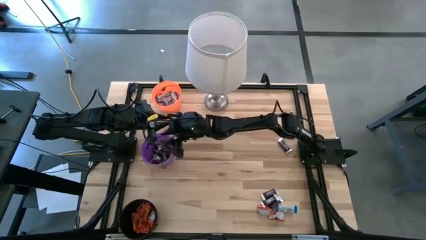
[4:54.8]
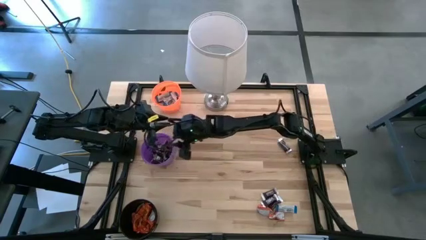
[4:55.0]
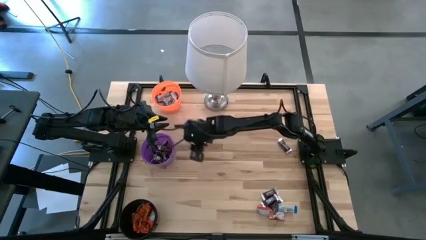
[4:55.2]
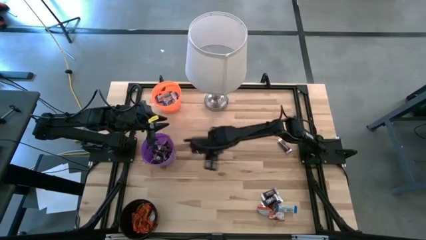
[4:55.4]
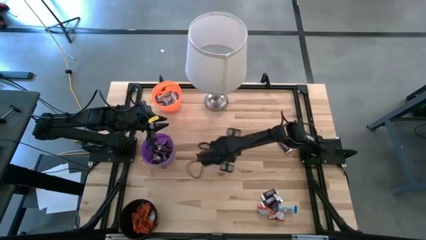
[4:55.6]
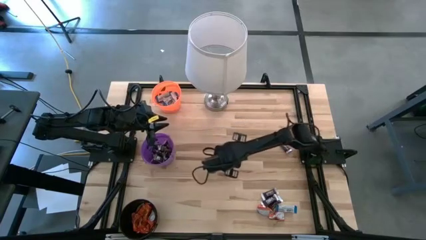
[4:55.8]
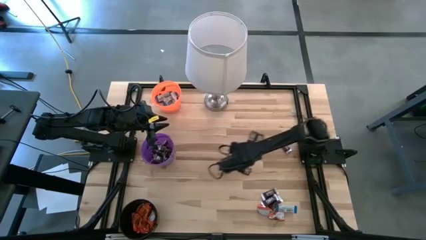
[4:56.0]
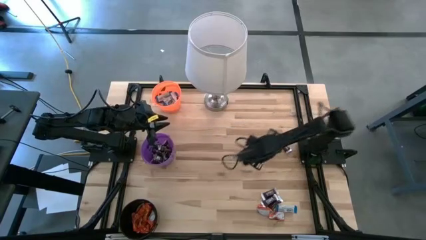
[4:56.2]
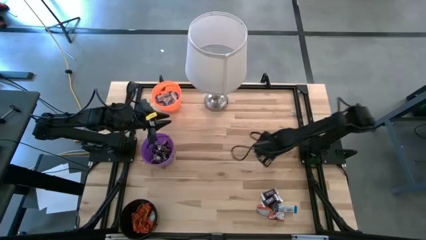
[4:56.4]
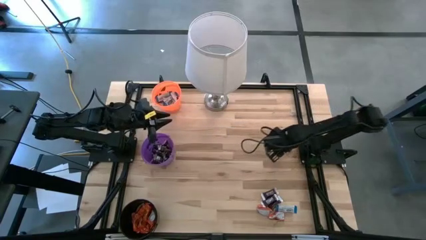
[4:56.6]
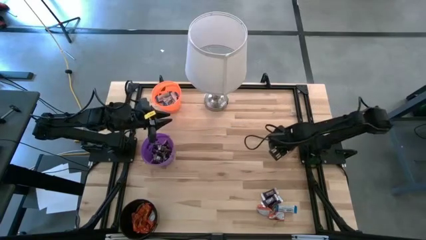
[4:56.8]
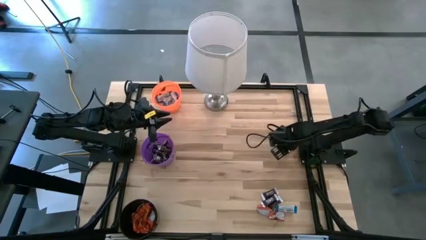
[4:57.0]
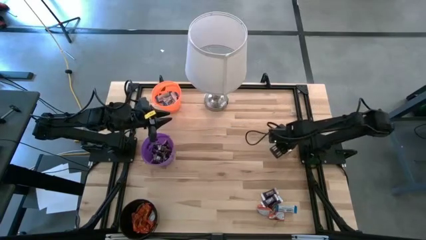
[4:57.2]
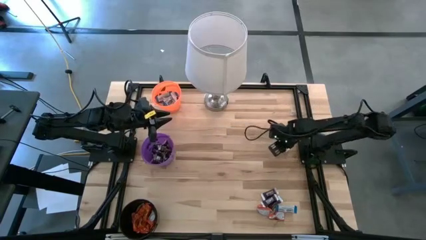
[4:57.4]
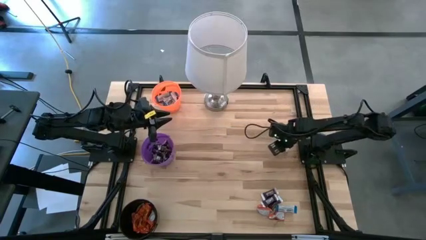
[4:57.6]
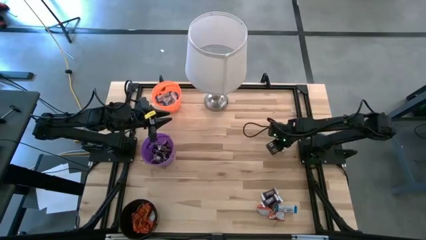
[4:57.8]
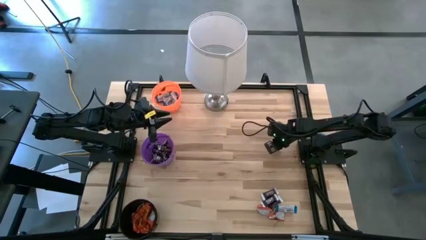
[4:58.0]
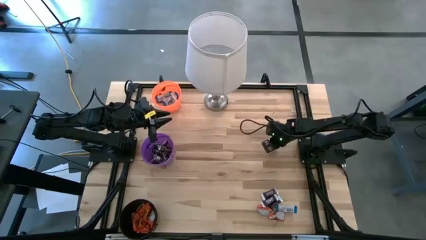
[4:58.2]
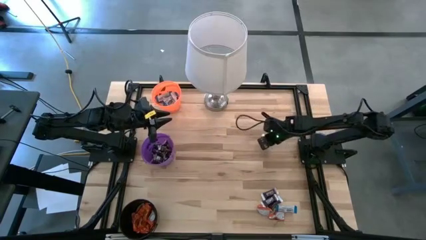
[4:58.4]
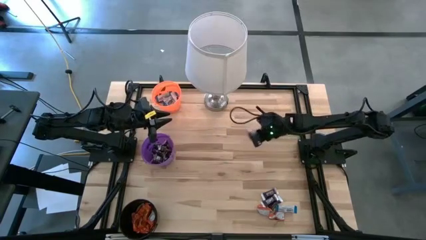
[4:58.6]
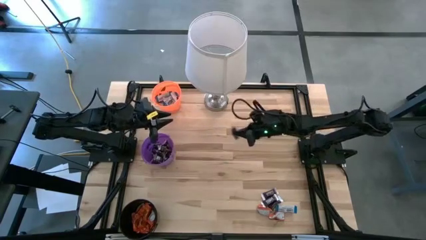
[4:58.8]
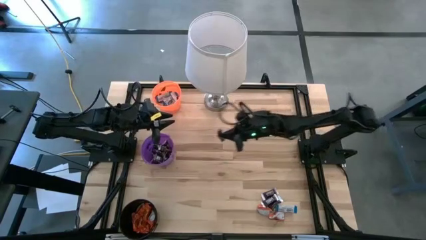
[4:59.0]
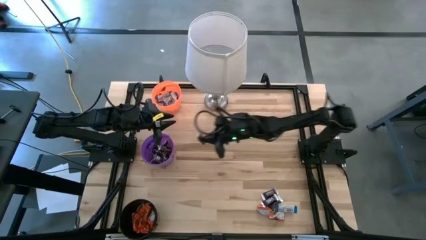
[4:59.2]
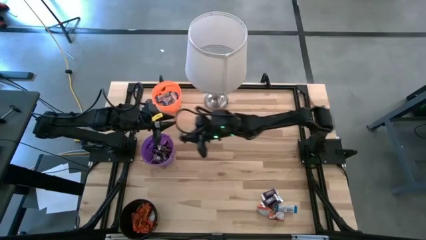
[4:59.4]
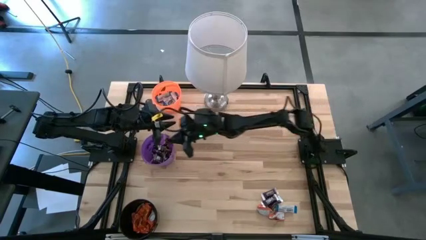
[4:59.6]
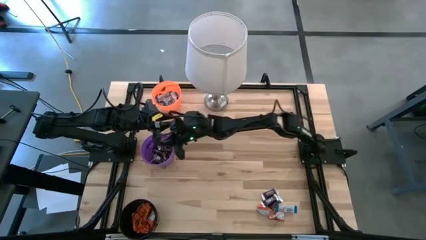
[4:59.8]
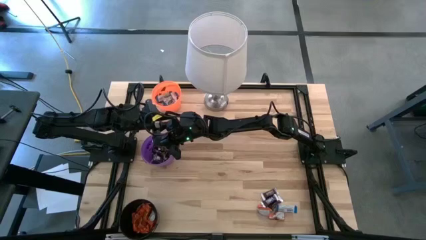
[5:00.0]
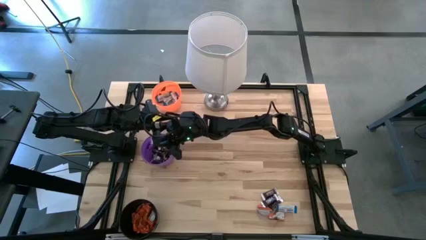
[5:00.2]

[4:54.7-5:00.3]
Task: Sort candy
Put the brown chocolate into the purple bucket

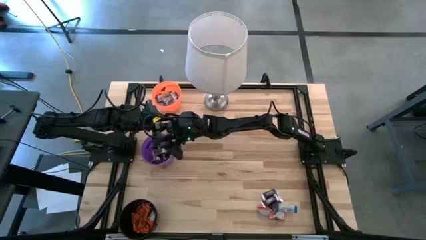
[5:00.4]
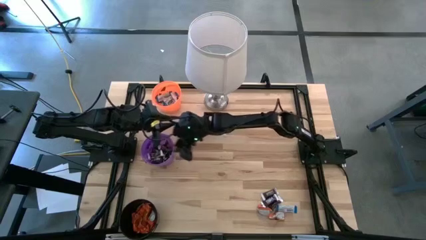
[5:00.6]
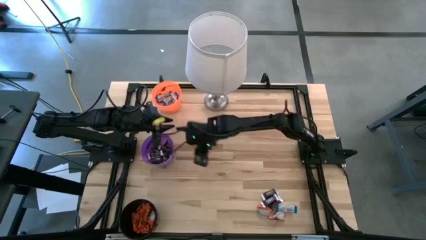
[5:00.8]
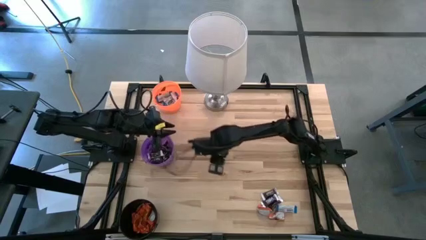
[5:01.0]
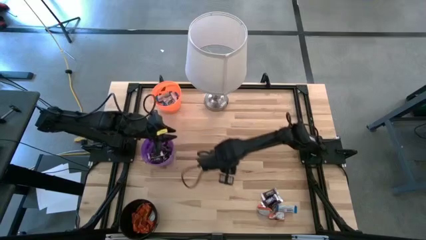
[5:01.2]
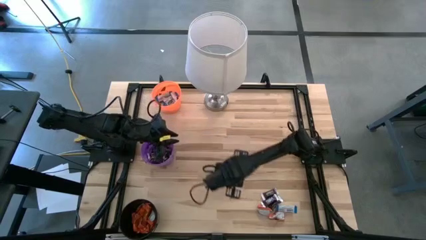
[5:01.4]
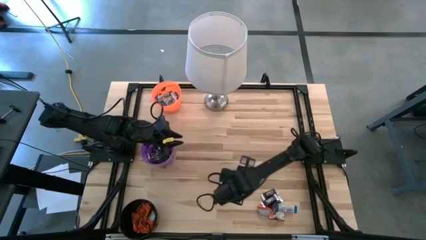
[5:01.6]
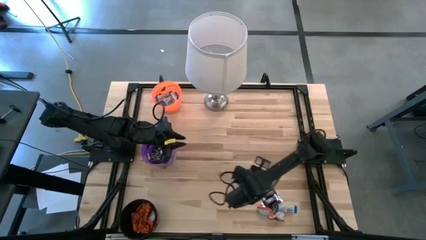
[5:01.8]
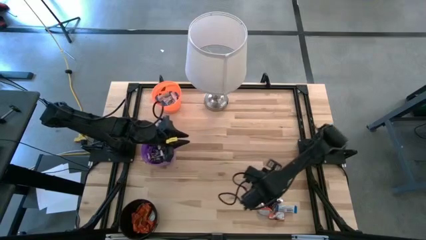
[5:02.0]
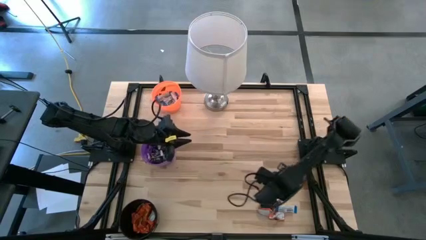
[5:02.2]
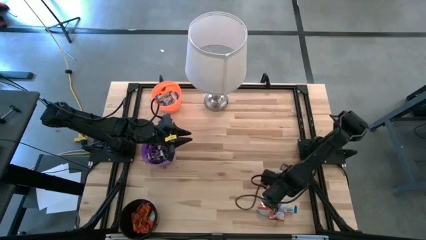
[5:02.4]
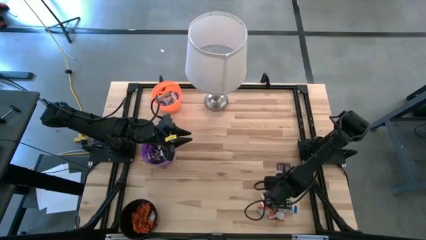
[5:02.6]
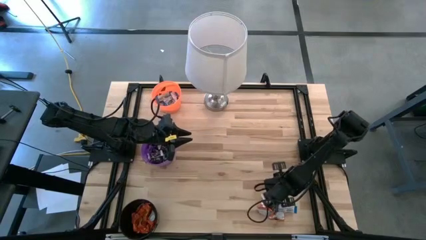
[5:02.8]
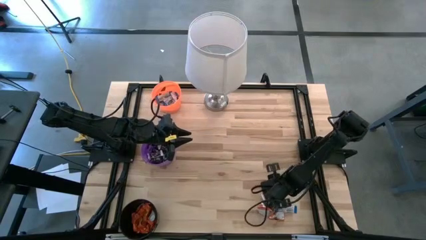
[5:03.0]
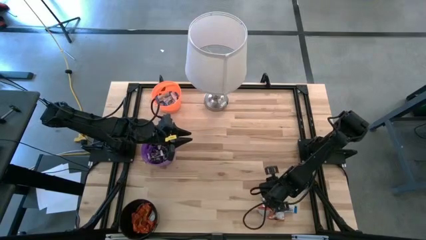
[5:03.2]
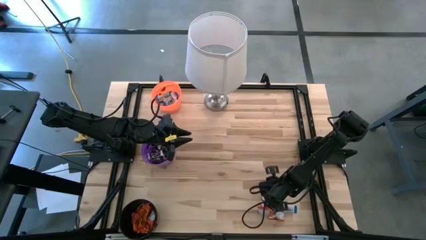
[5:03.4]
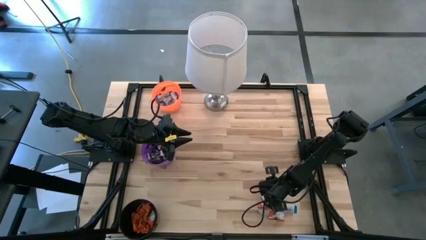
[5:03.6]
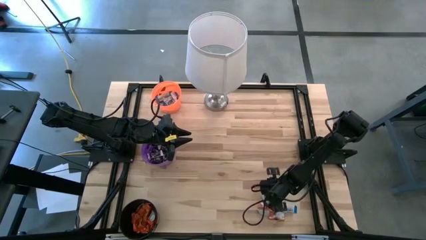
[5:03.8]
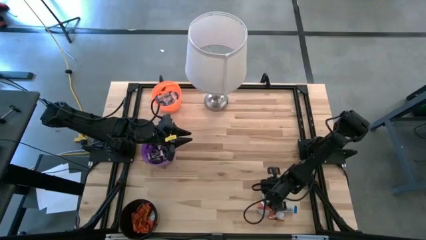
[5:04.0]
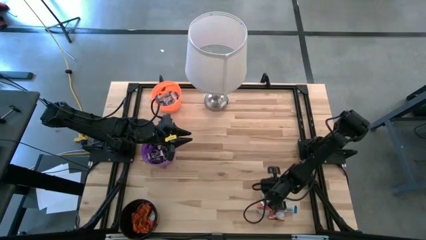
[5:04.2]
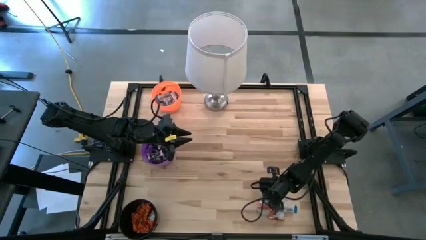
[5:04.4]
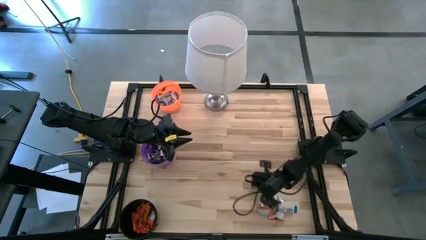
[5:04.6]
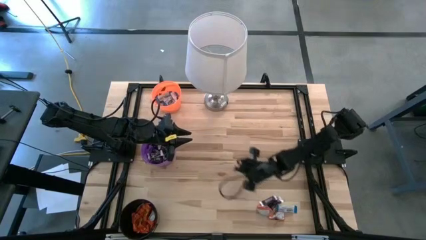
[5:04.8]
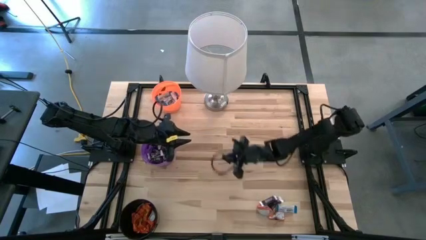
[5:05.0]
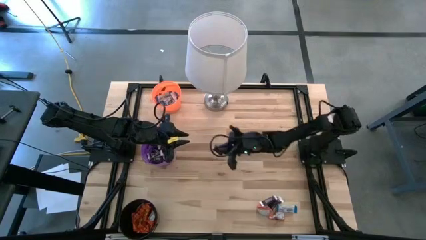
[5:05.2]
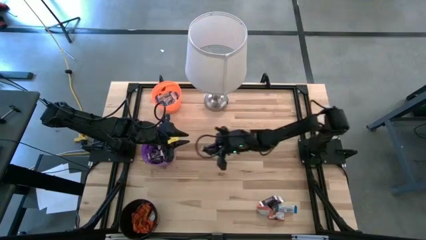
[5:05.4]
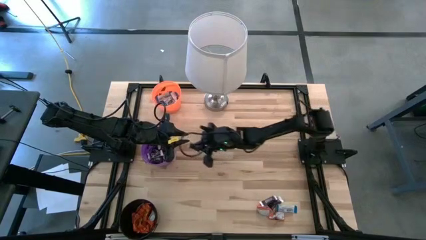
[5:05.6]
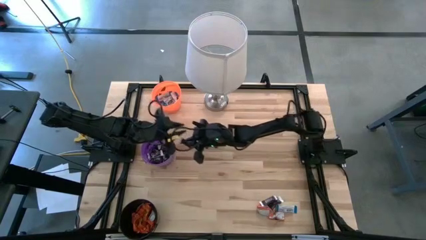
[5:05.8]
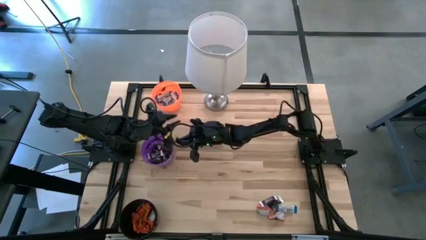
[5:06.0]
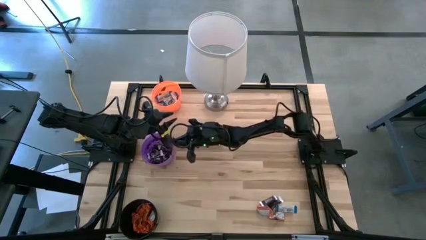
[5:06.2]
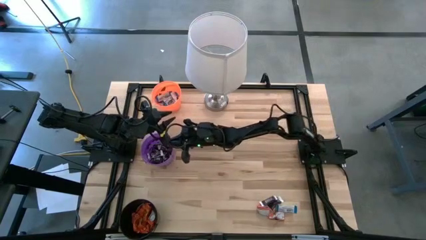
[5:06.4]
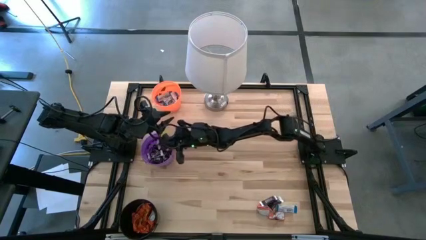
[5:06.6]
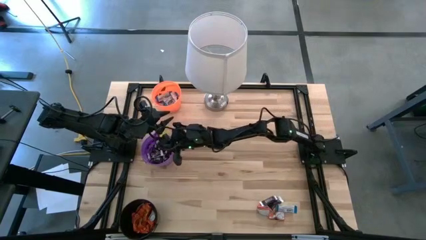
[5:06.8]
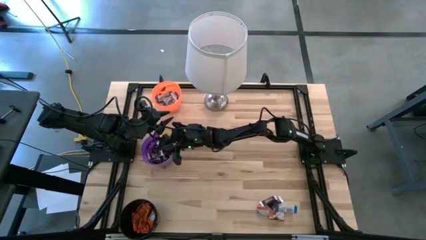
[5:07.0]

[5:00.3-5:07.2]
Put the brown chocolate into the purple bucket

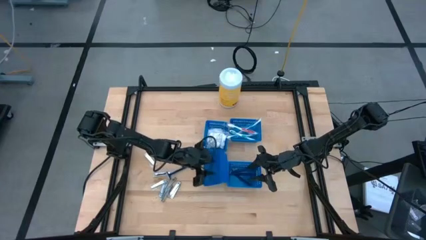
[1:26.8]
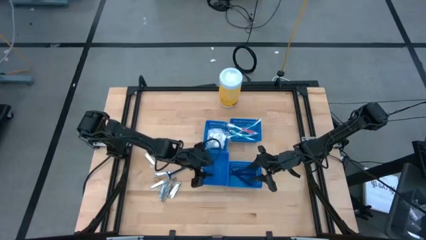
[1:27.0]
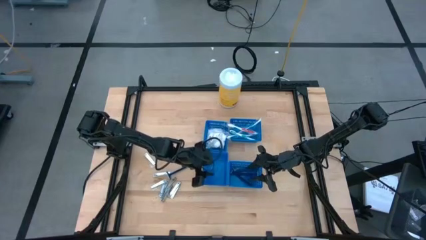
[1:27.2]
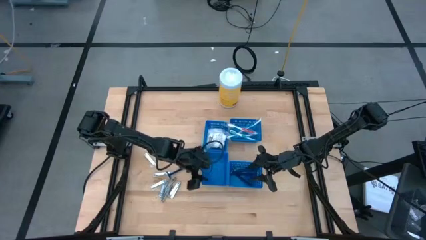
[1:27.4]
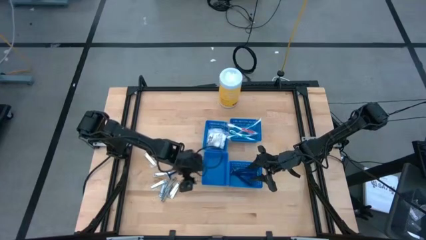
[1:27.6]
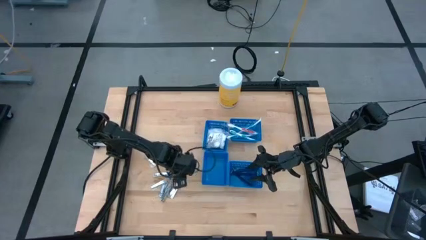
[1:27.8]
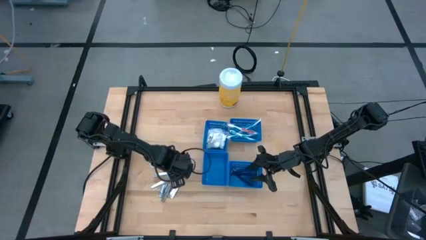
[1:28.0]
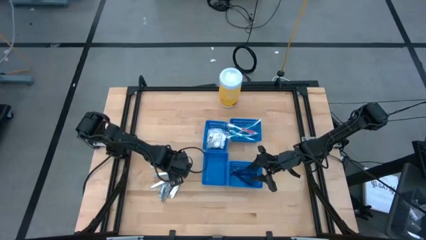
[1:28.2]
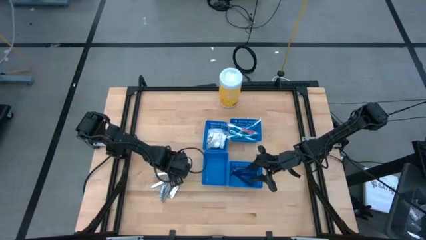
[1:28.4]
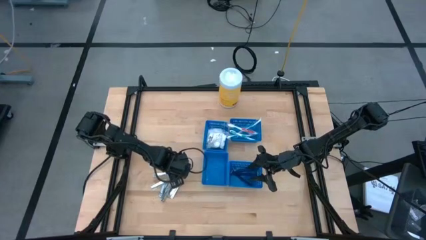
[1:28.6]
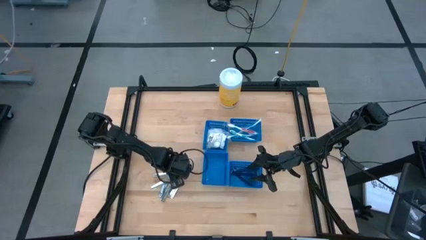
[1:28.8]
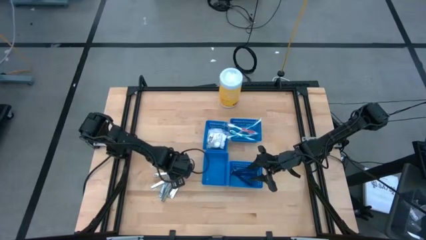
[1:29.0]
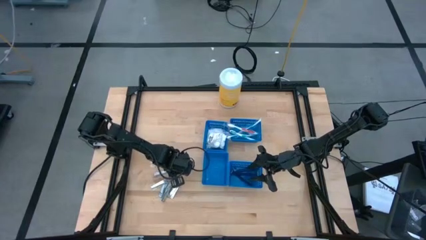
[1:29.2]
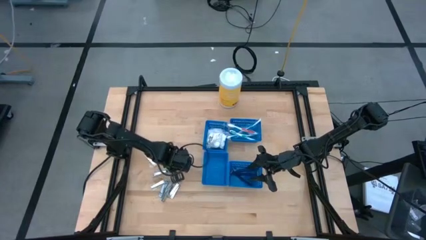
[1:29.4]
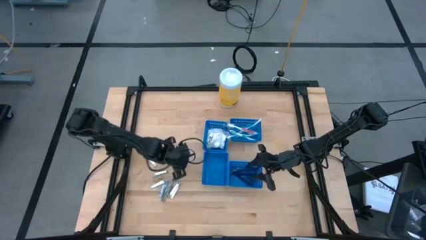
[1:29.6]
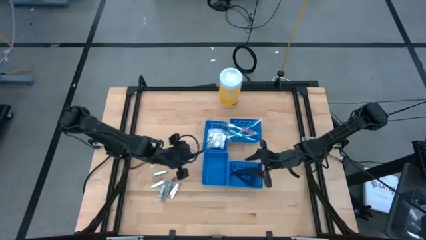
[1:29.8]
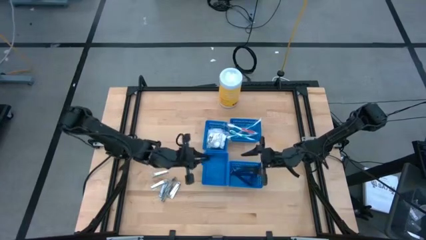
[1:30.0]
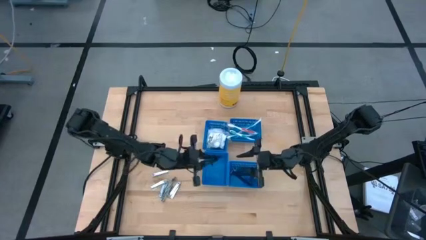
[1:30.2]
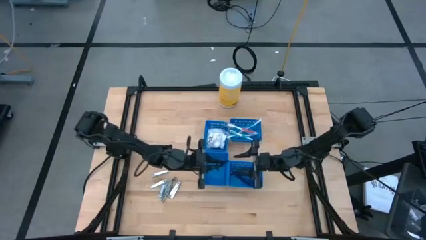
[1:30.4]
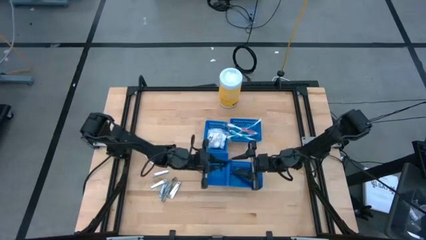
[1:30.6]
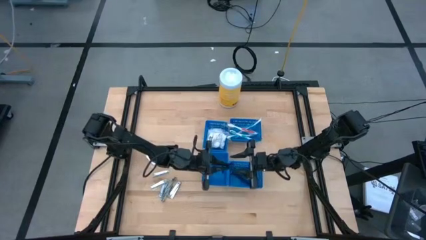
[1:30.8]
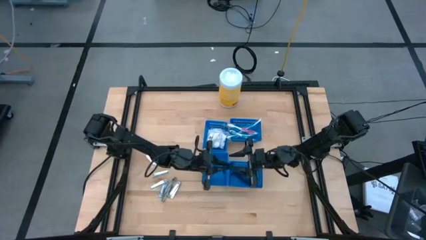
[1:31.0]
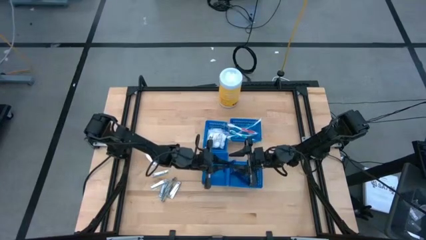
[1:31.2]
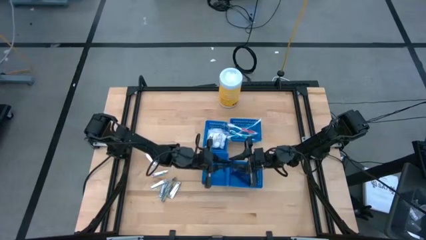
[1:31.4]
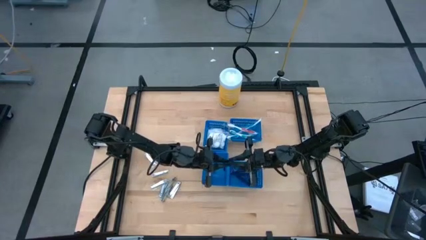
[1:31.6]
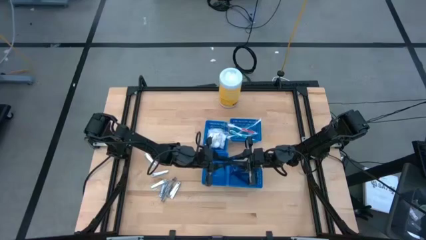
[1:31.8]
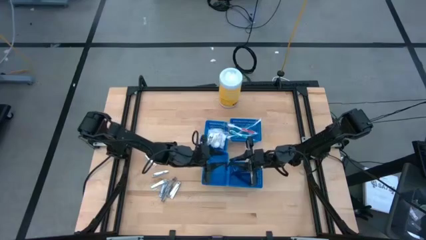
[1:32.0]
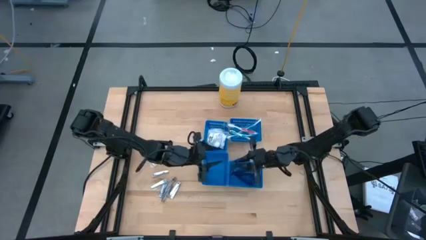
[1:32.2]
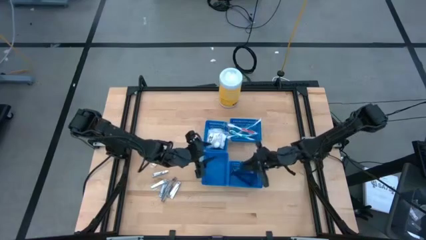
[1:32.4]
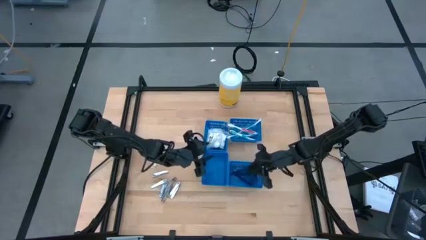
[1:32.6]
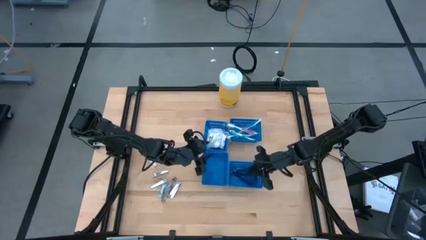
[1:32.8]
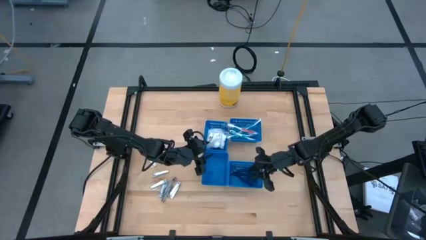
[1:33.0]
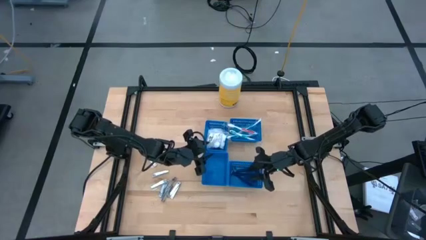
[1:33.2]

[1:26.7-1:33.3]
Task: Pick & Place Travel size toiletries
Put the blue razor into the bottom right blue bin
